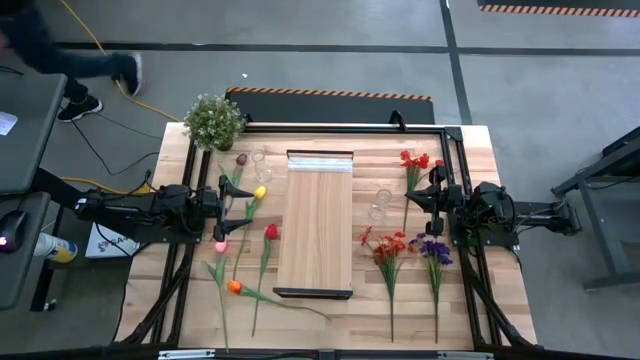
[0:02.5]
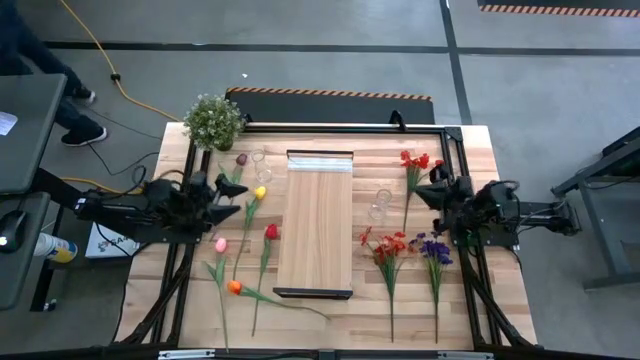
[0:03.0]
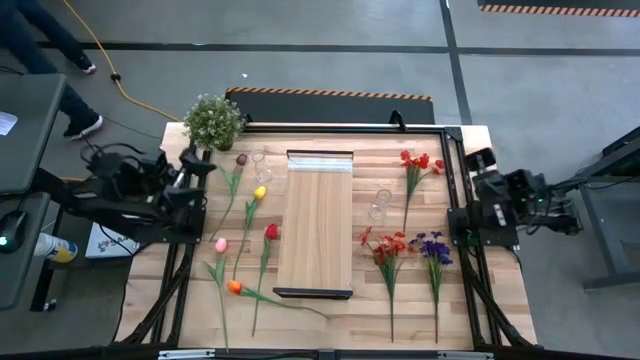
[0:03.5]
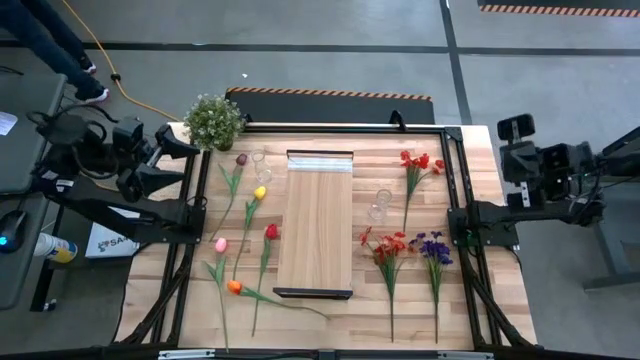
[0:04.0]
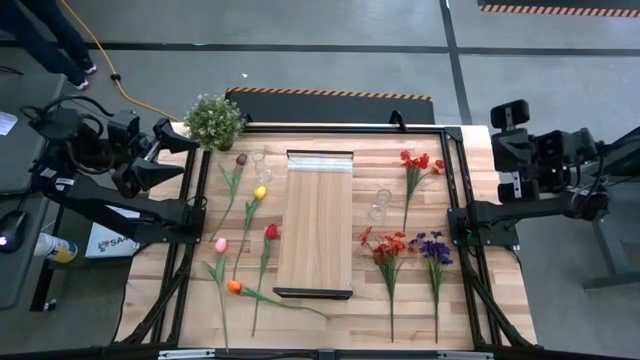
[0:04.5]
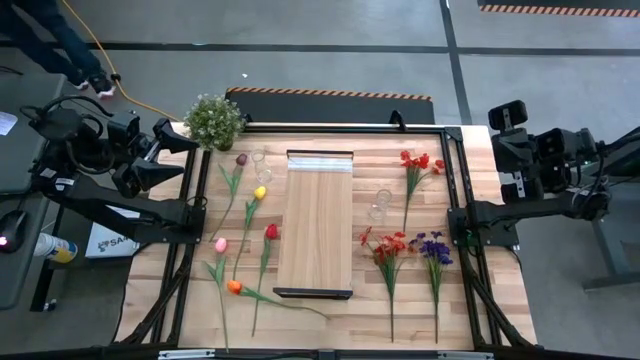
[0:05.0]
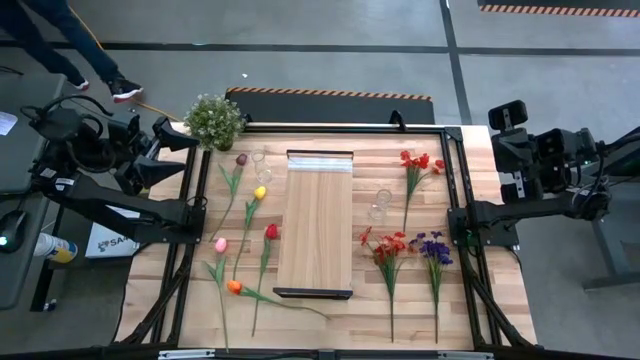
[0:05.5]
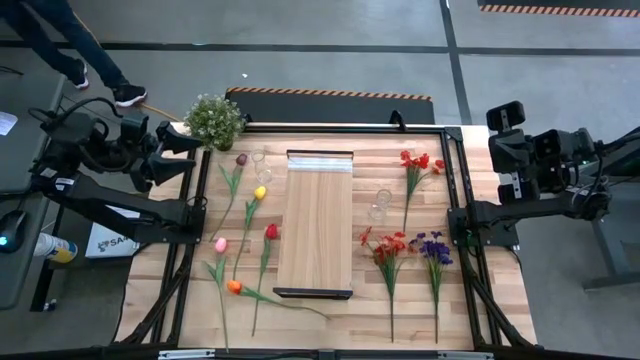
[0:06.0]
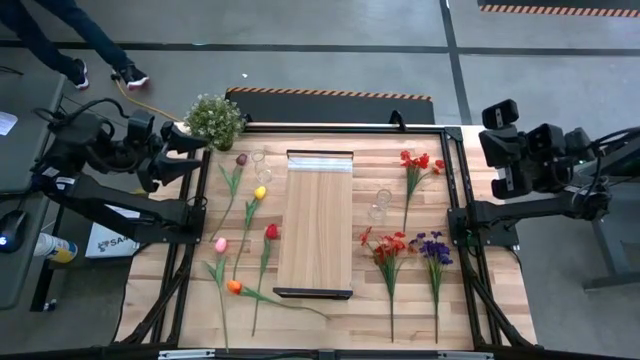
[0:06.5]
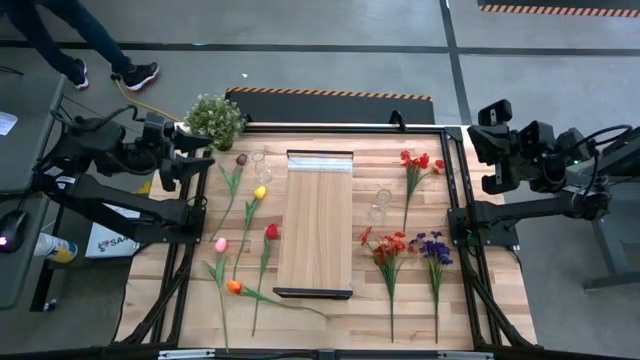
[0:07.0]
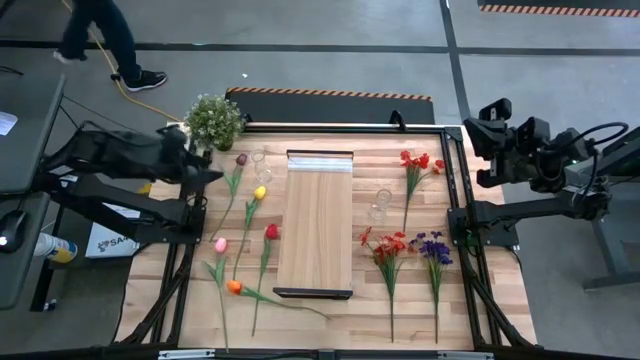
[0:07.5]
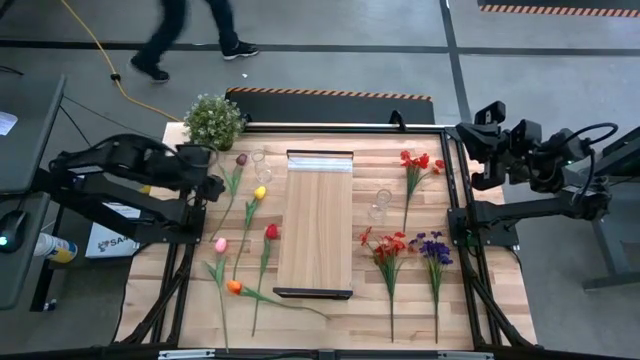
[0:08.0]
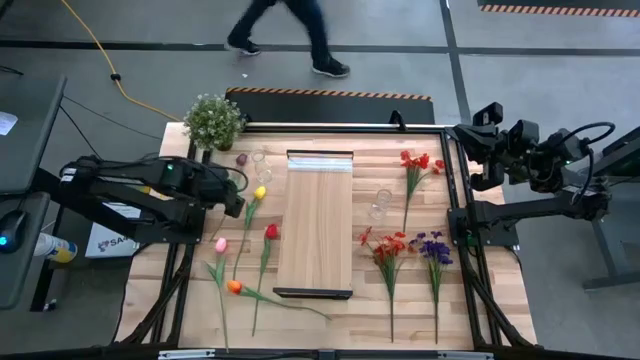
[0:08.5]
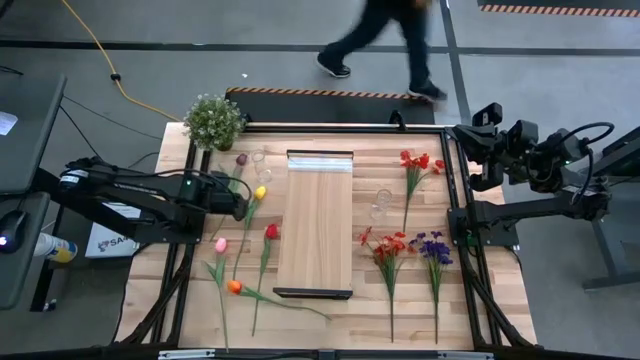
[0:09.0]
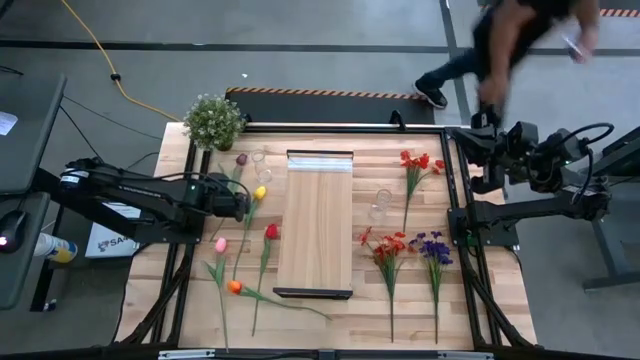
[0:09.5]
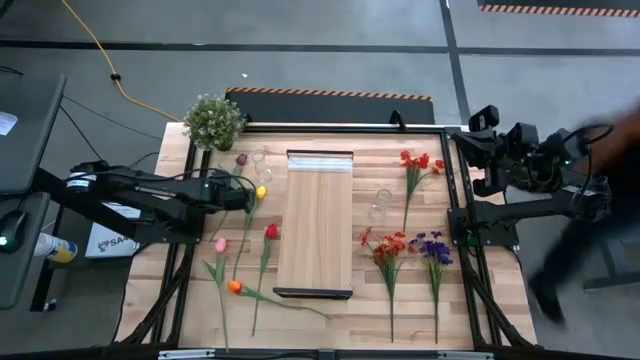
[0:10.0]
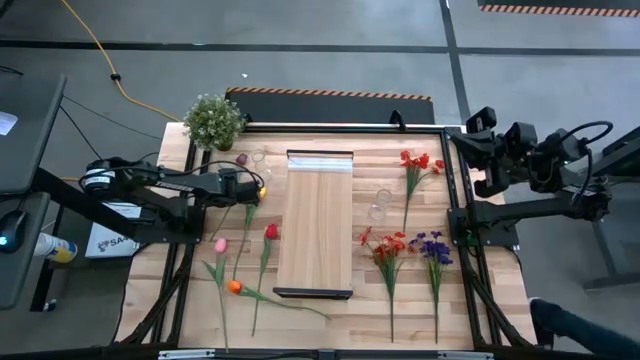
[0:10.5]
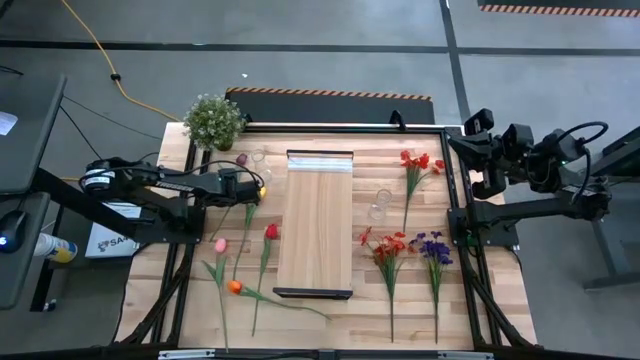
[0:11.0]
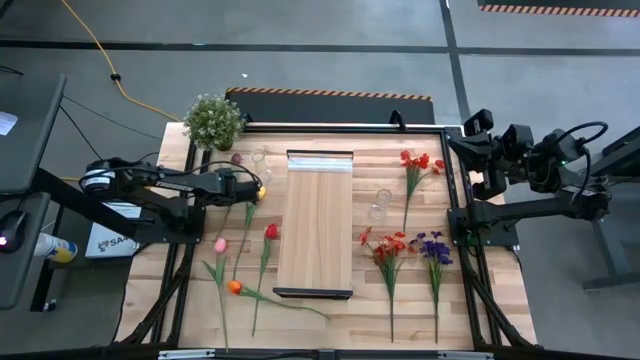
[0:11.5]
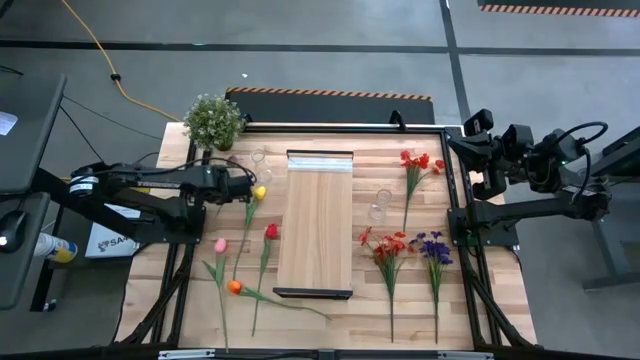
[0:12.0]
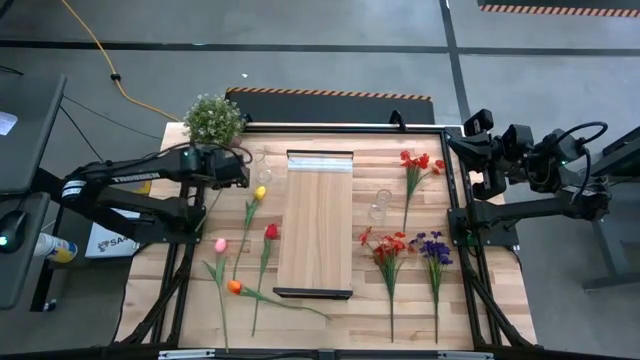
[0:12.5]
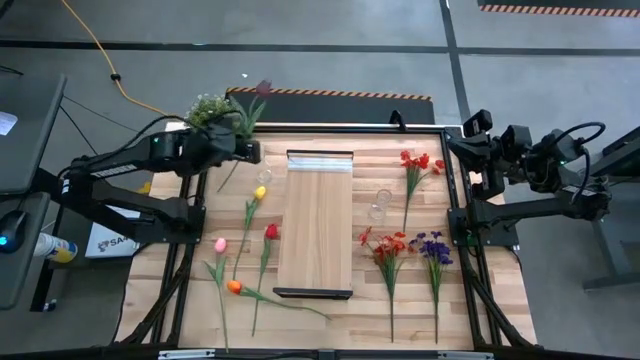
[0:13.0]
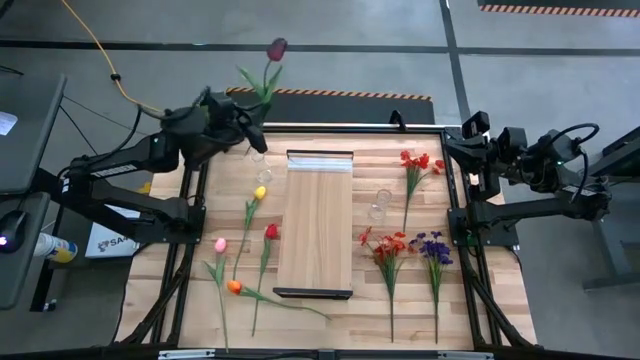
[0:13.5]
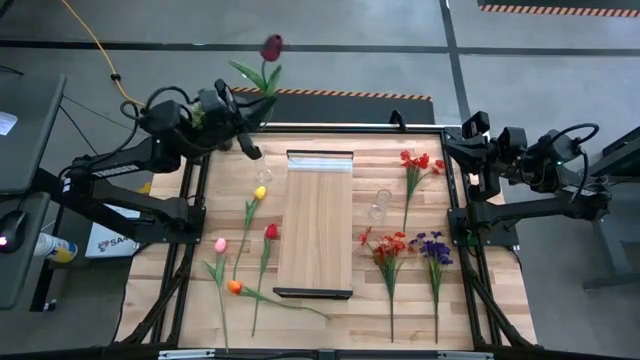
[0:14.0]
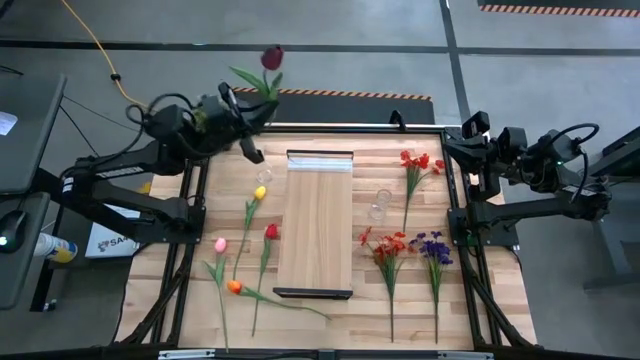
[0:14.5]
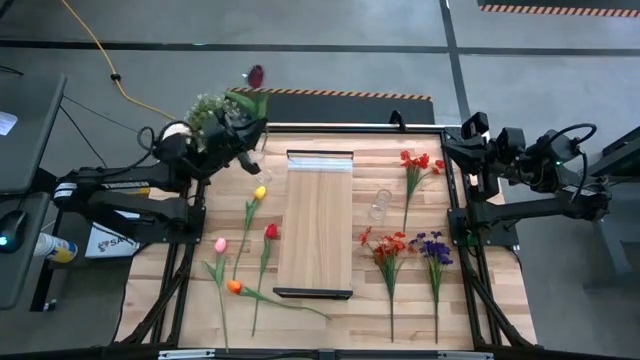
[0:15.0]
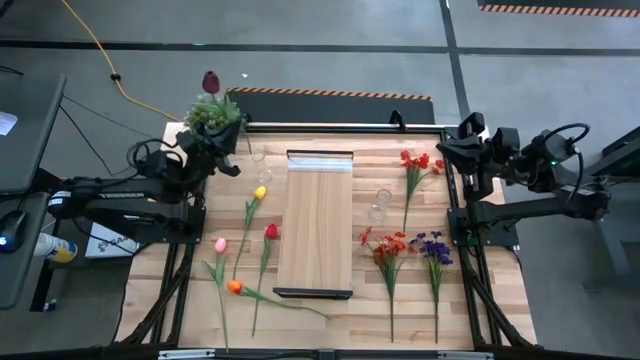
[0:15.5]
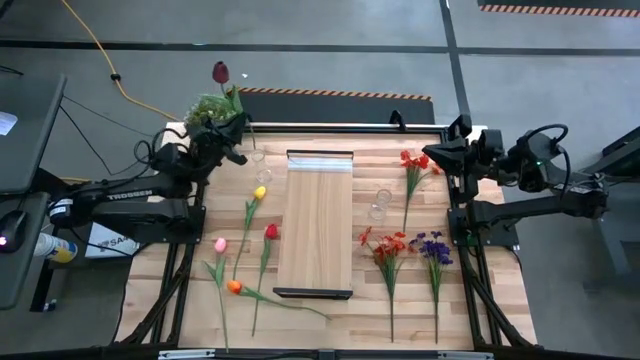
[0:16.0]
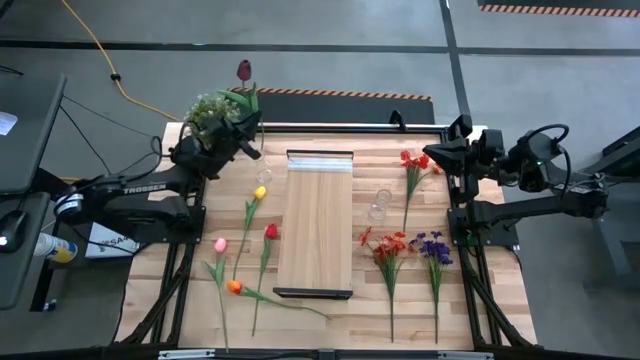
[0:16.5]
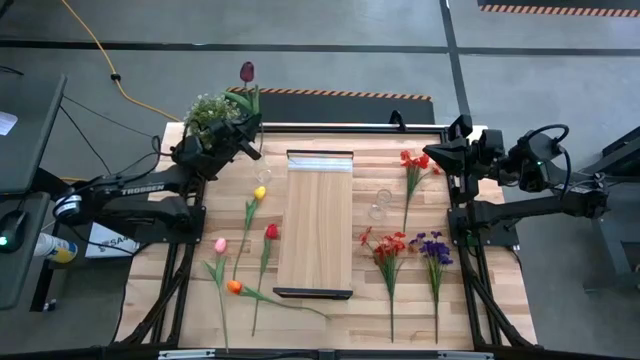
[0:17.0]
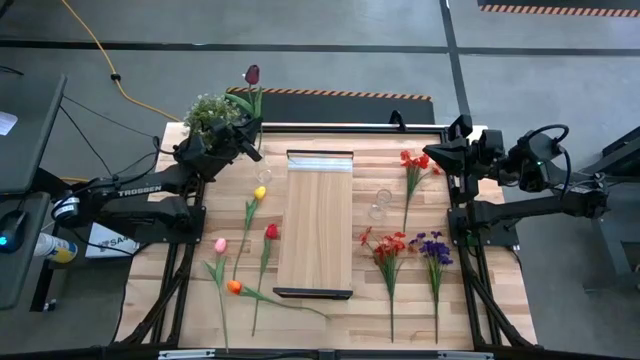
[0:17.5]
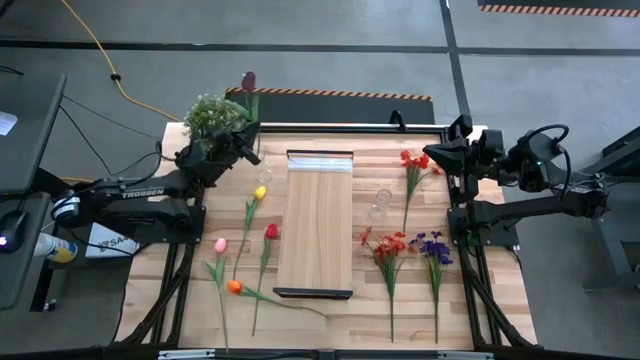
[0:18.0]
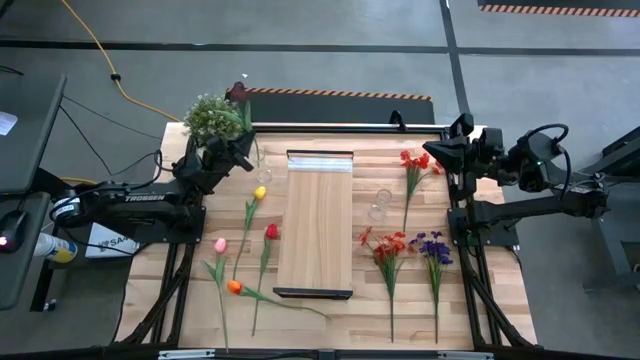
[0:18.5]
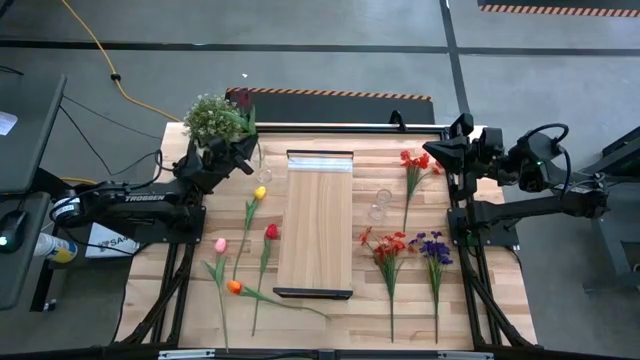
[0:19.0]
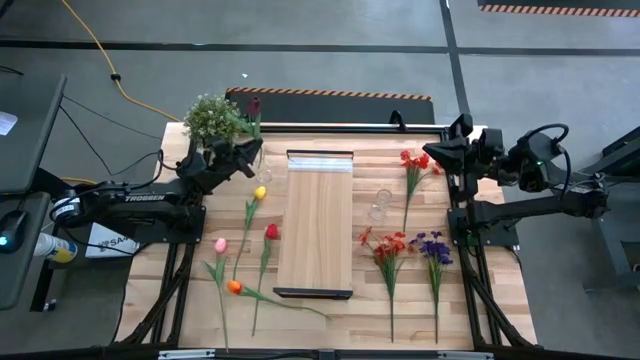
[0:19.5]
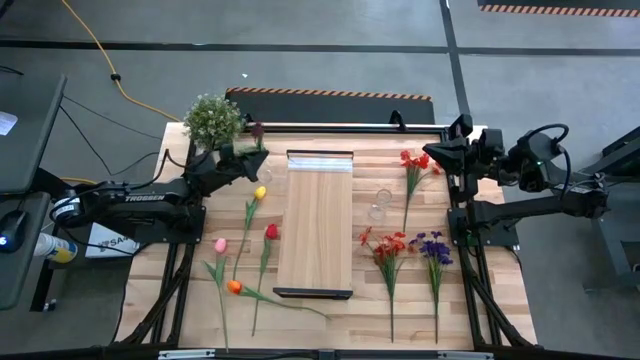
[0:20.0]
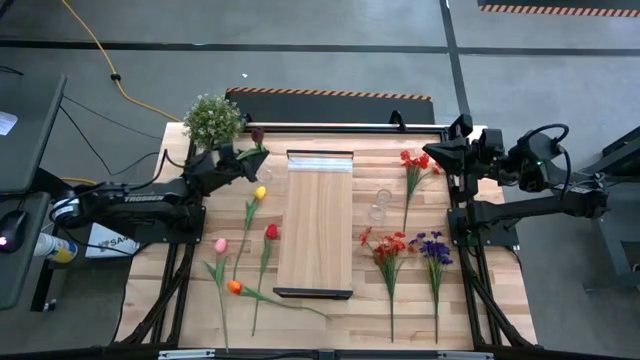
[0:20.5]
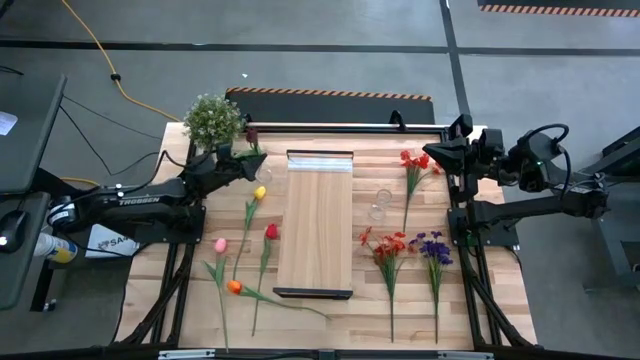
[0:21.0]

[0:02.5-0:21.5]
Task: Pick and place flowers into a vace then onto a shelf
Put the brown flower into the left vase

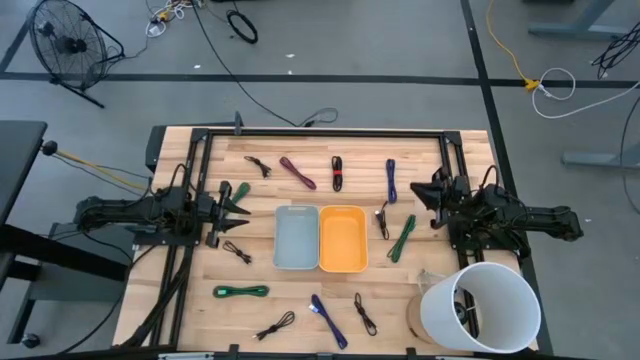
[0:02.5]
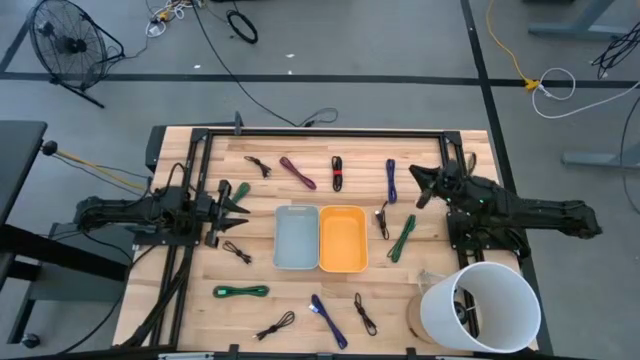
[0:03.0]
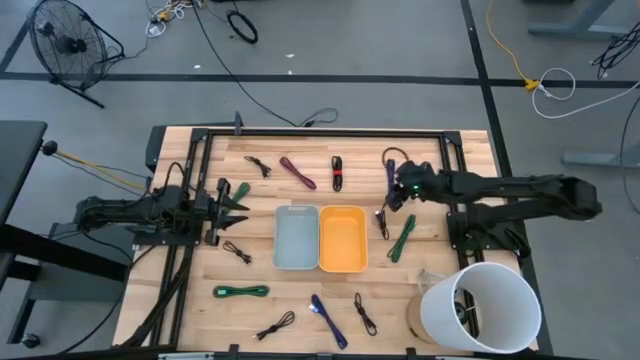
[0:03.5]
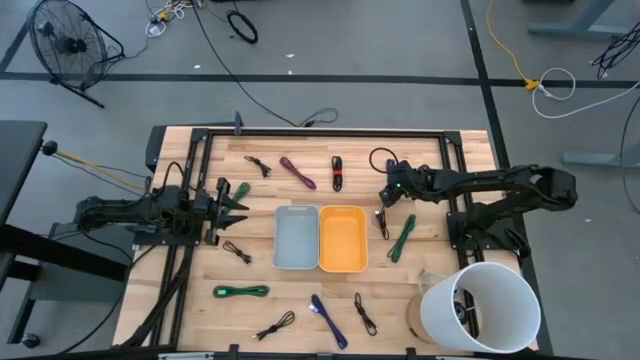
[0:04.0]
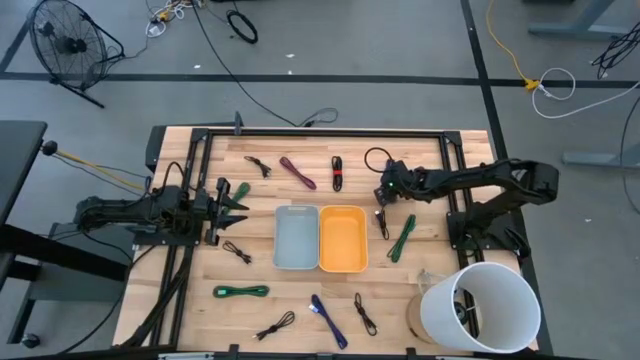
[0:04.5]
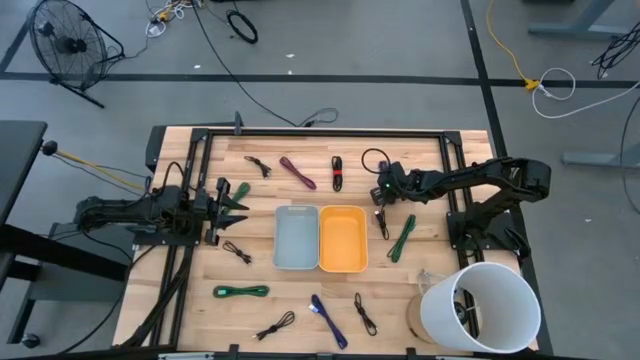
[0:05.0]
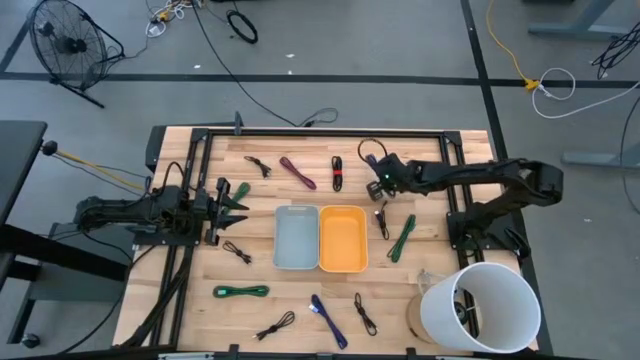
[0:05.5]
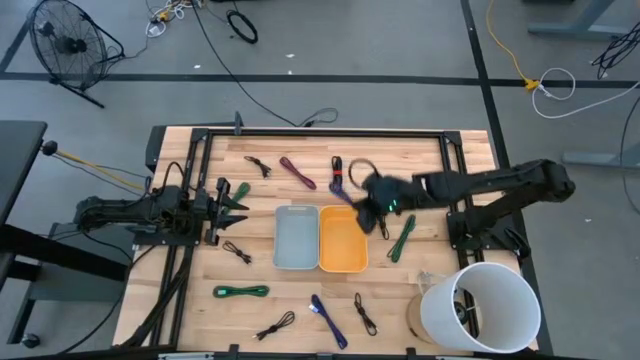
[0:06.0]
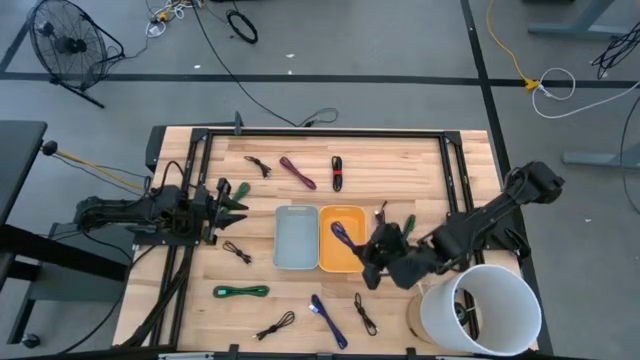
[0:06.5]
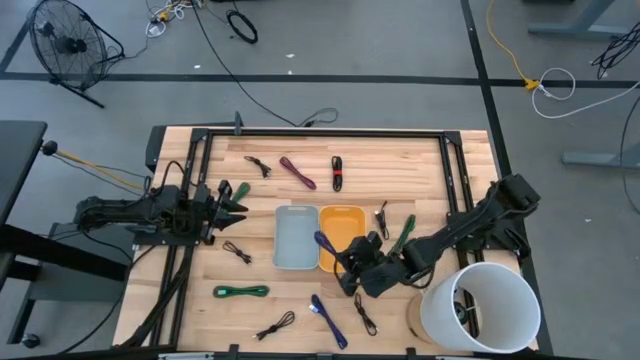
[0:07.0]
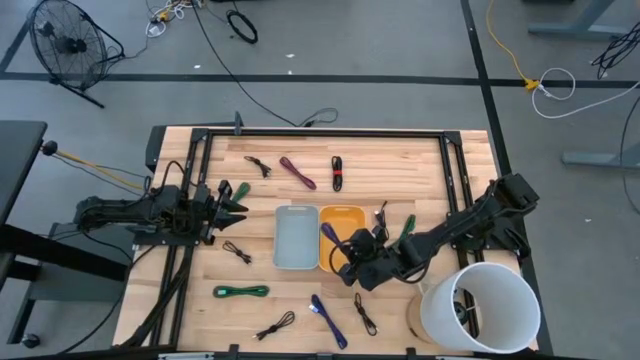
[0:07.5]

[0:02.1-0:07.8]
Task: Pick & Place USB Port
Put the blue charger cable into the yellow bin
